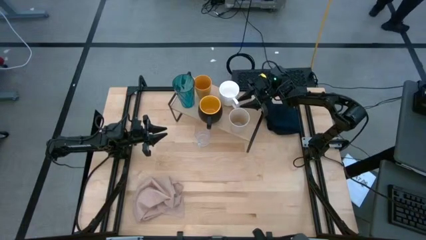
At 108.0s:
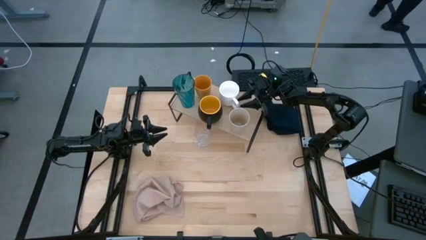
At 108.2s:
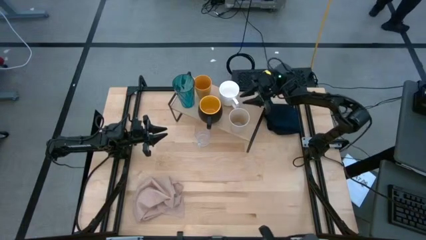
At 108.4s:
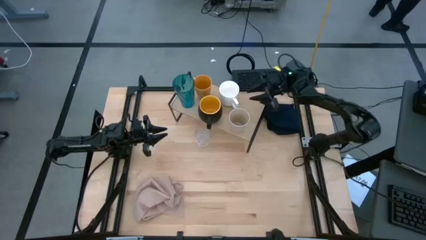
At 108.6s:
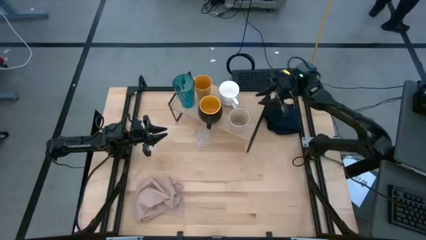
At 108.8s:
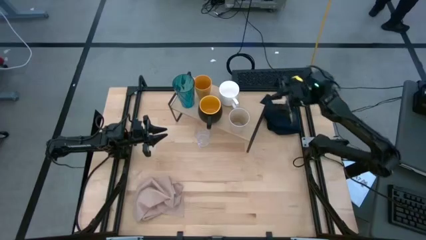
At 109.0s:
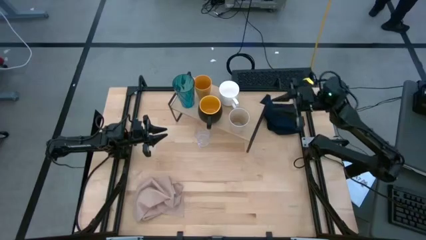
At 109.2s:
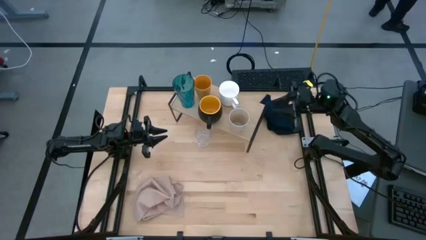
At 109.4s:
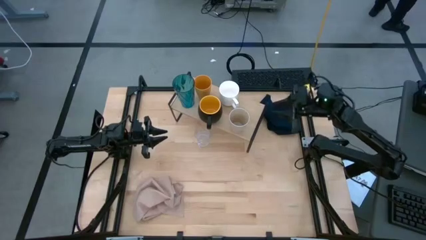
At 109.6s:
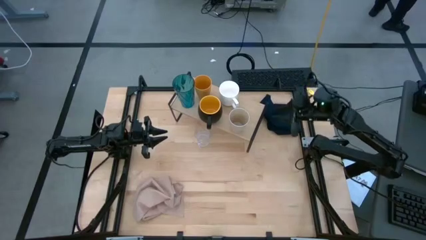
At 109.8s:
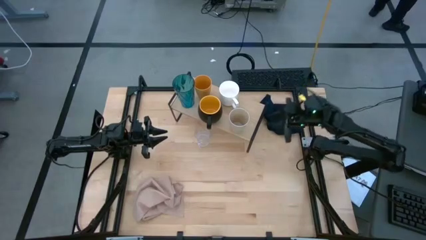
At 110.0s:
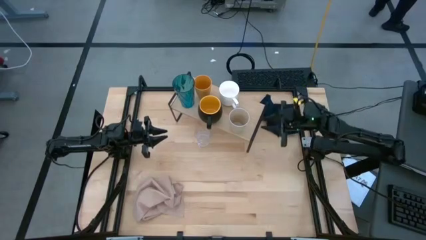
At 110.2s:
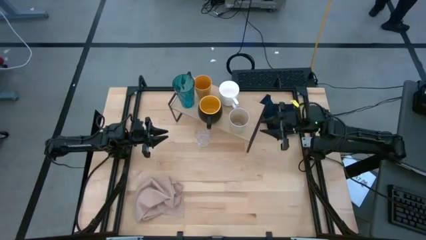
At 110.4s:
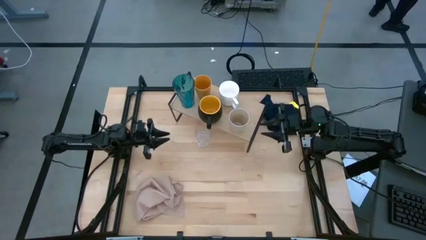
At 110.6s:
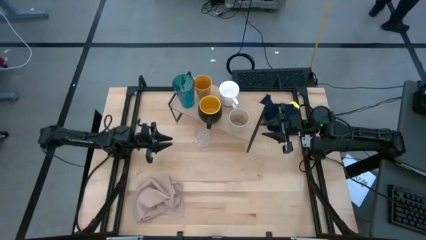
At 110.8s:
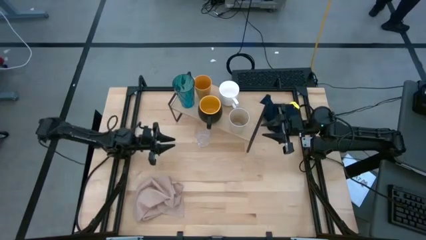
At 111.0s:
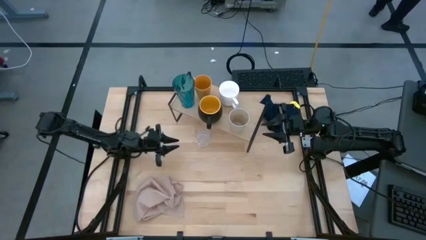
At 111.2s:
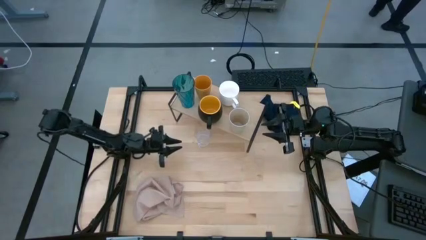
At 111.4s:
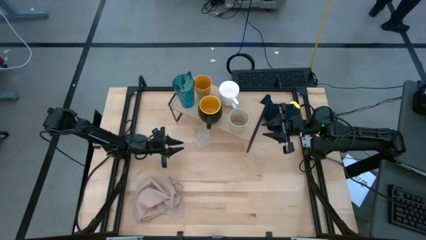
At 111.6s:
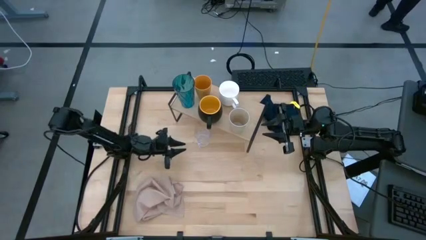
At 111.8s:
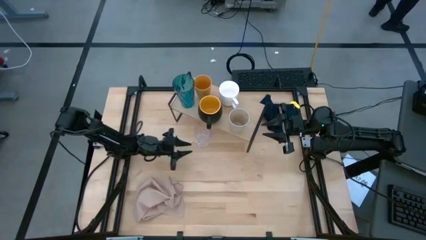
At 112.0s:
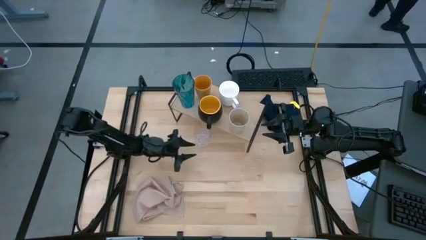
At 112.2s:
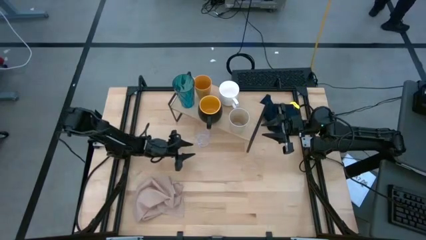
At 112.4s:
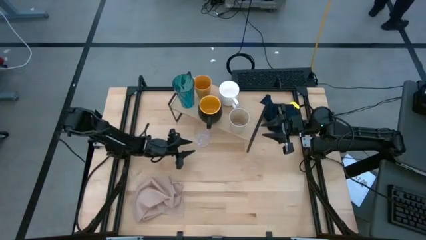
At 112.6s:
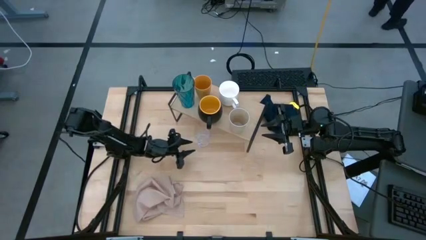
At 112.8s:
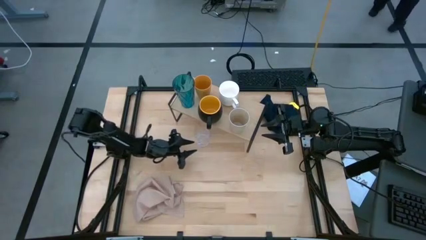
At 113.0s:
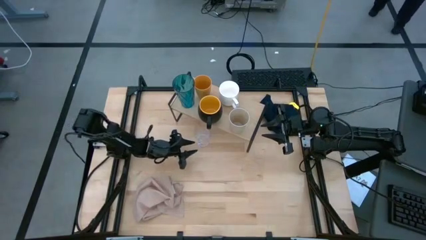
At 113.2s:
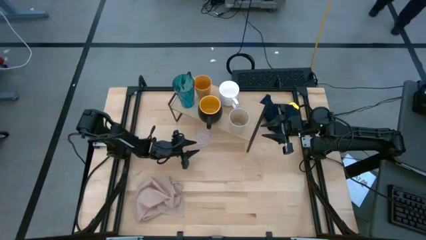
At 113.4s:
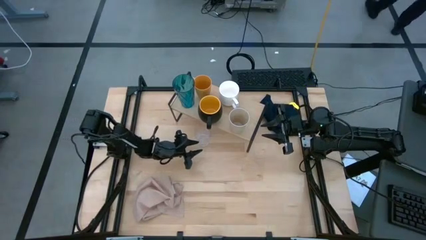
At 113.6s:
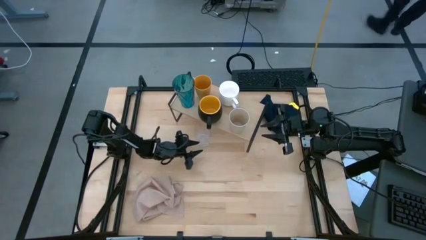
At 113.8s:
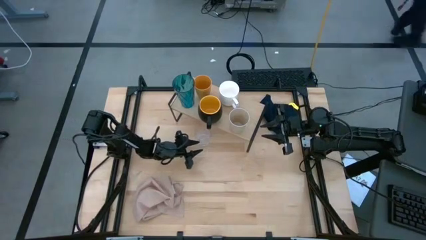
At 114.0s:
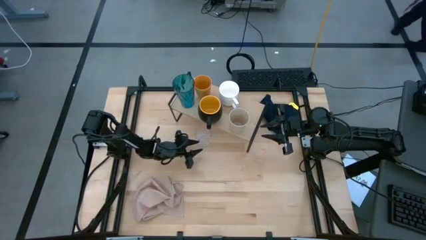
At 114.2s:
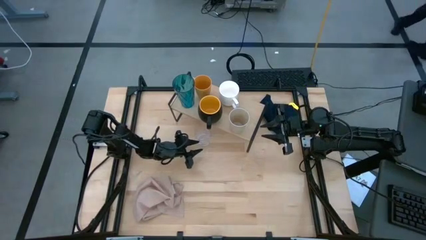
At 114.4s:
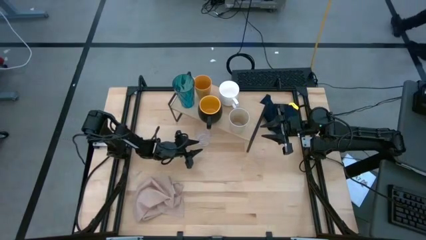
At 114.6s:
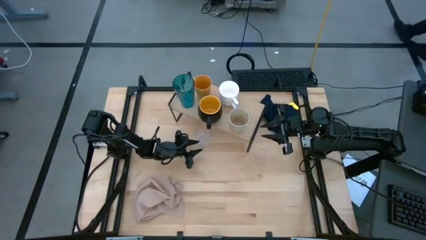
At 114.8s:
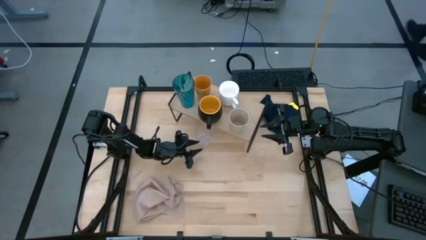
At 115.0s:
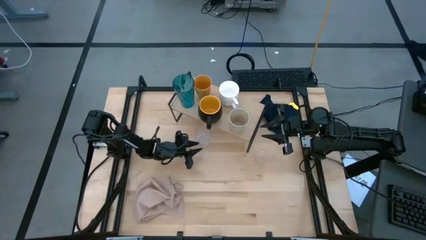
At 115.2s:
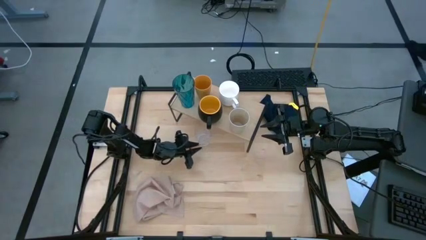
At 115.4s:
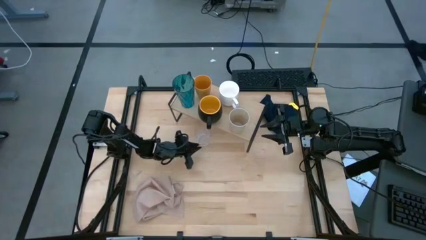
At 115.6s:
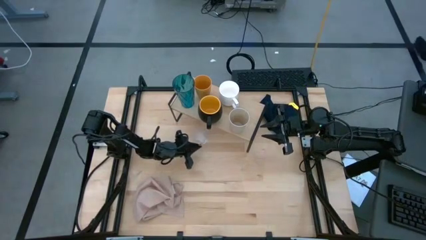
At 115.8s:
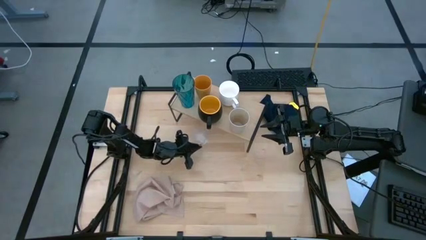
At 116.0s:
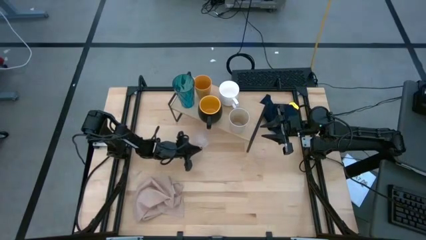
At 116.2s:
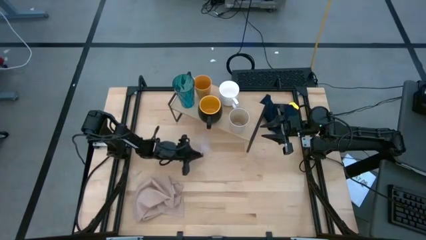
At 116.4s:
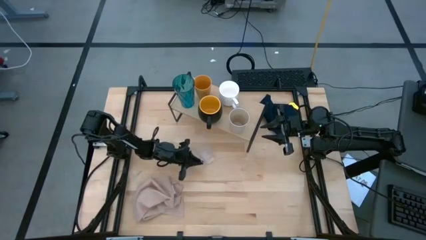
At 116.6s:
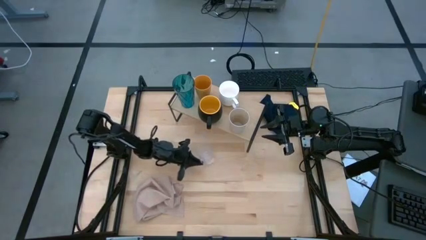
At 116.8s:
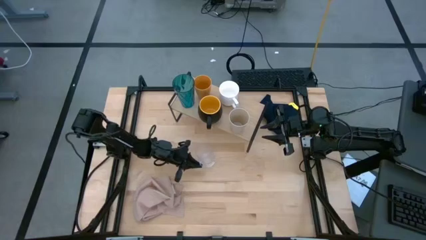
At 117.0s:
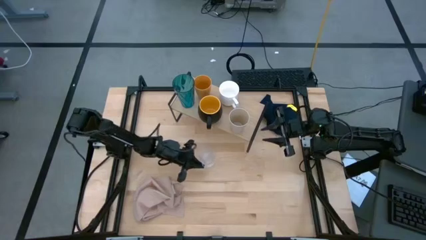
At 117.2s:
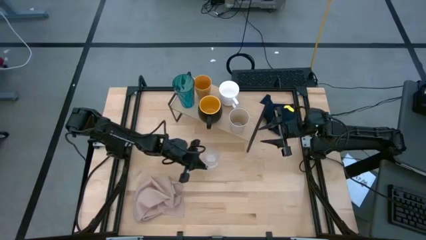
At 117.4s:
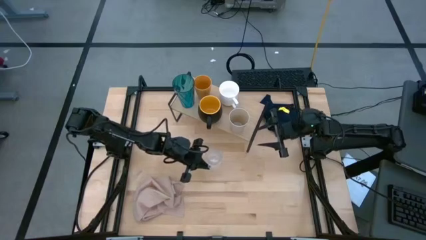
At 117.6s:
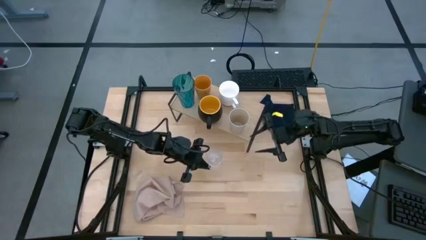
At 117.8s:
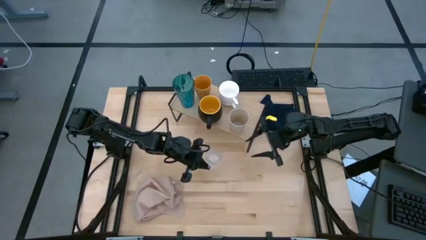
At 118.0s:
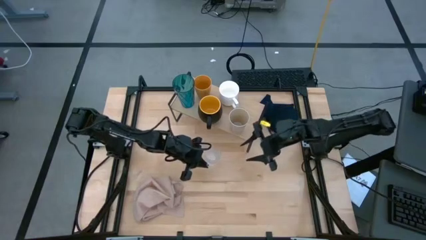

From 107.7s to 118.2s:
Task: Stack small to large cups/mugs on shelf
Put the transparent cup on the shelf
